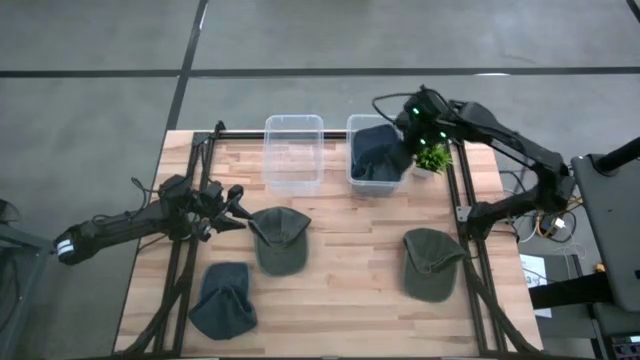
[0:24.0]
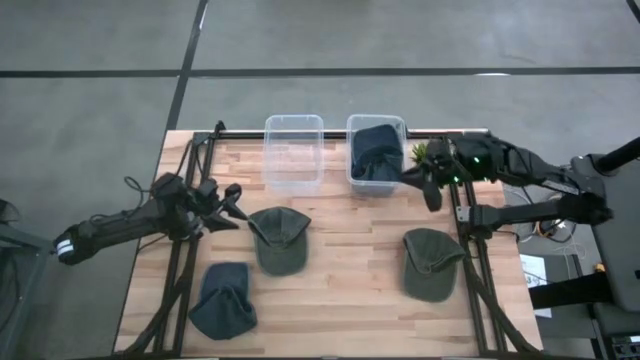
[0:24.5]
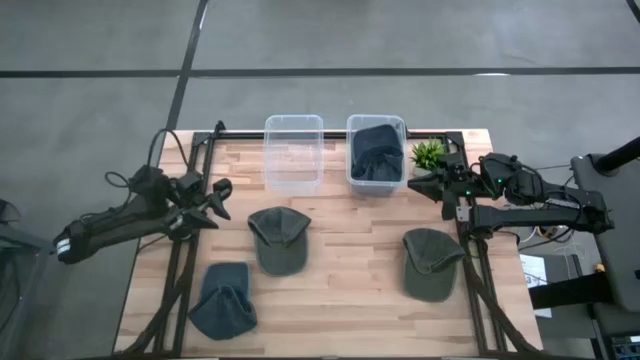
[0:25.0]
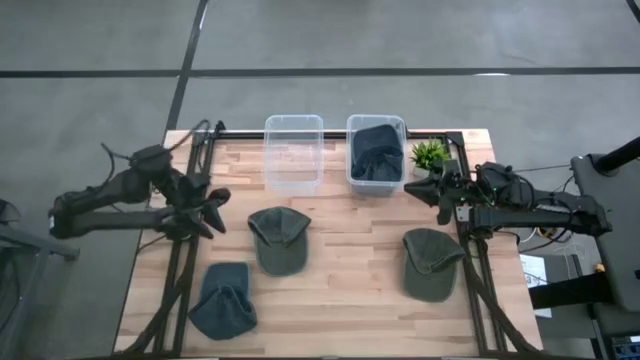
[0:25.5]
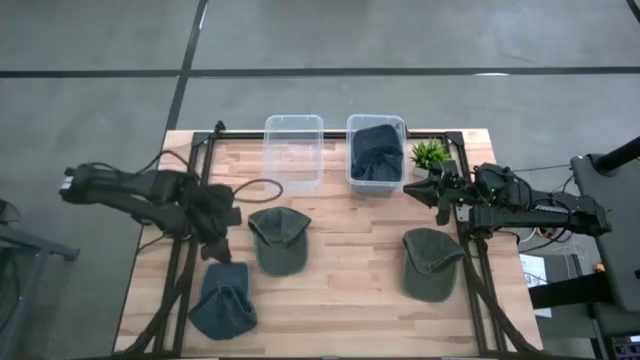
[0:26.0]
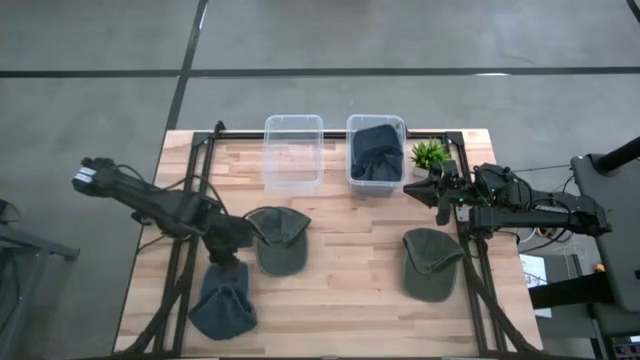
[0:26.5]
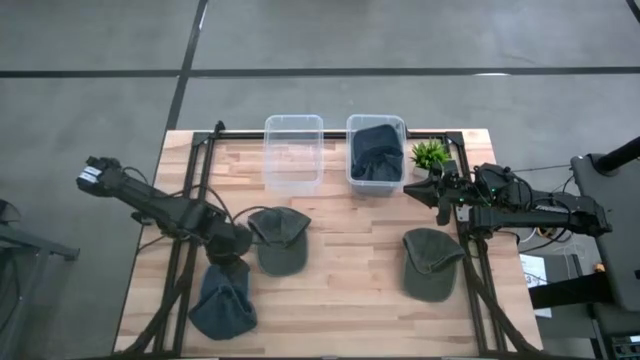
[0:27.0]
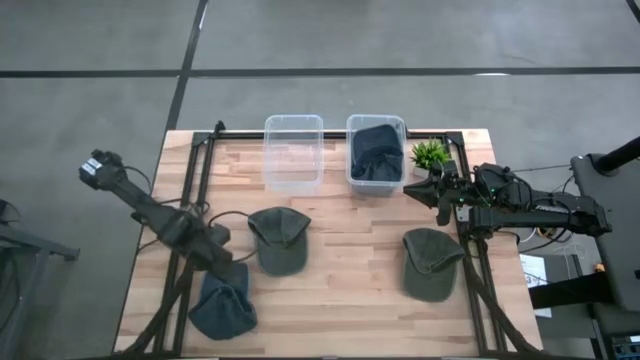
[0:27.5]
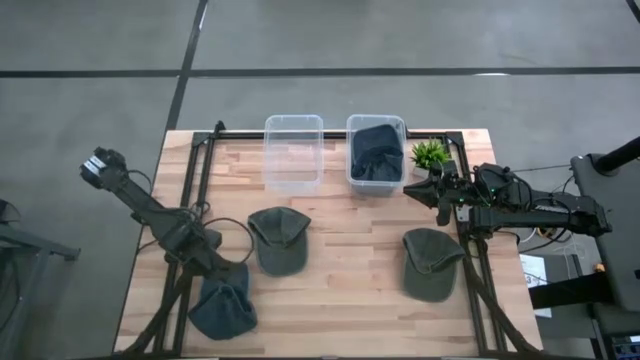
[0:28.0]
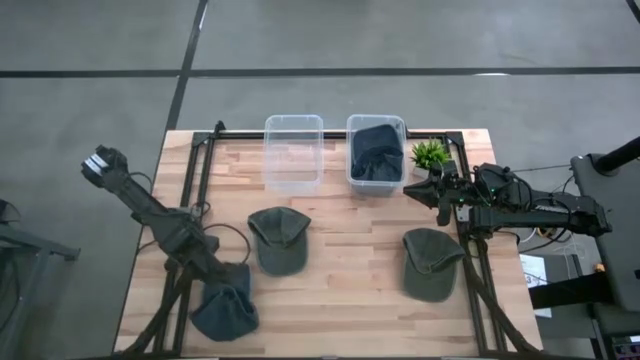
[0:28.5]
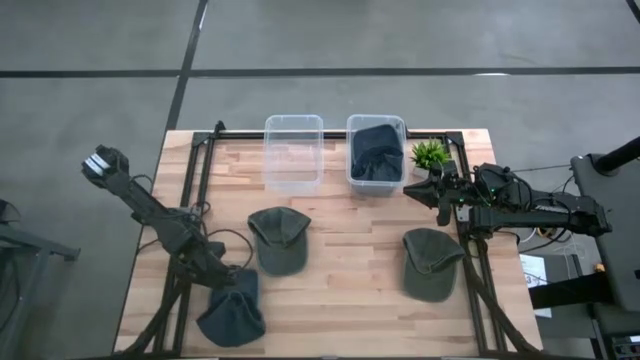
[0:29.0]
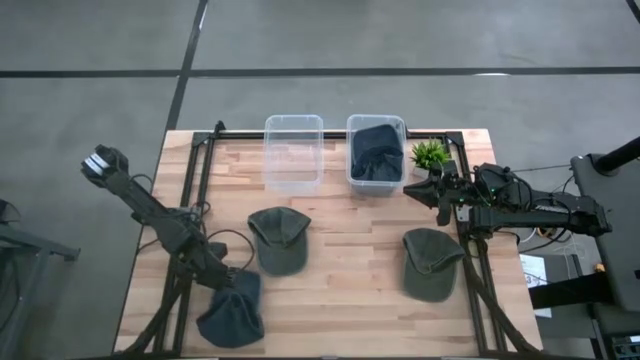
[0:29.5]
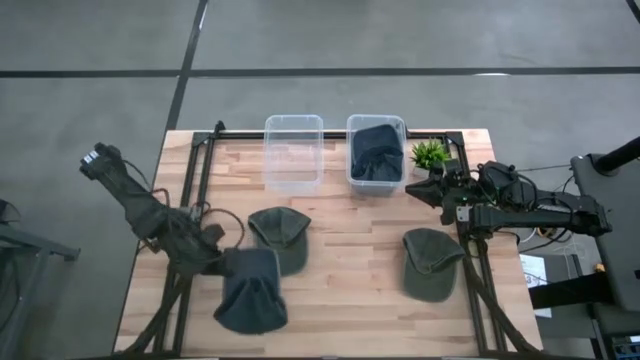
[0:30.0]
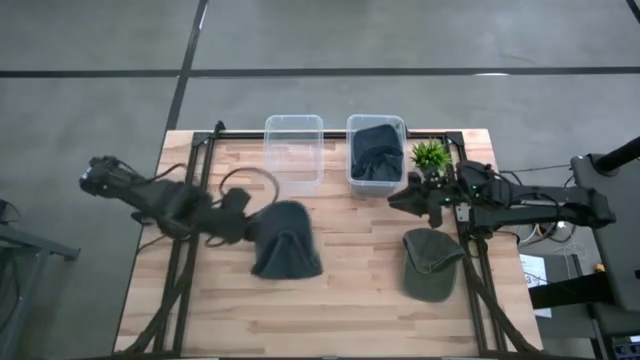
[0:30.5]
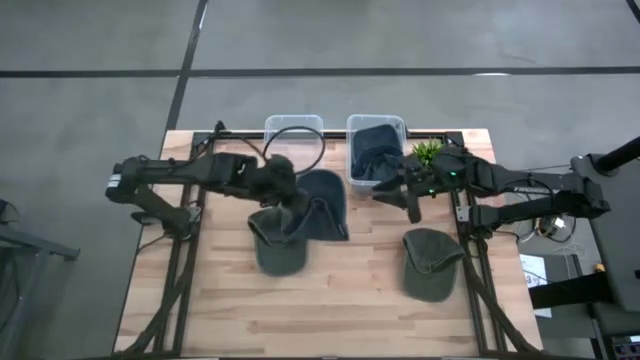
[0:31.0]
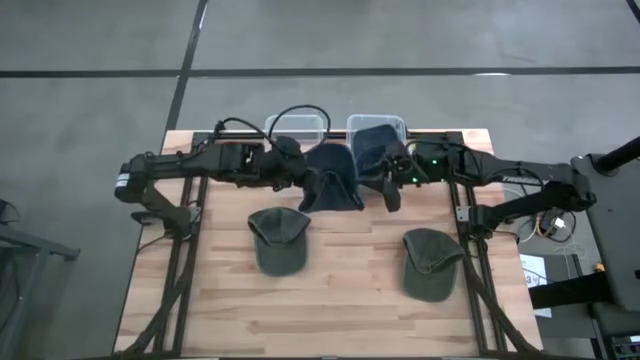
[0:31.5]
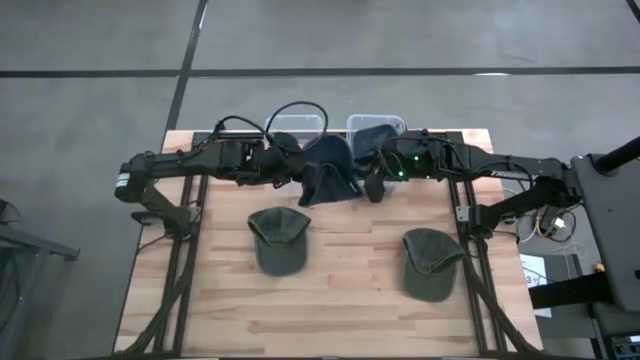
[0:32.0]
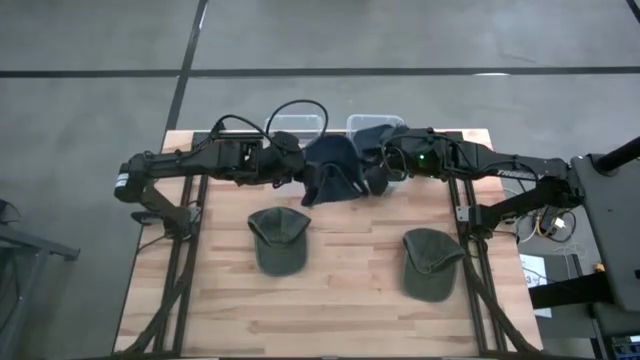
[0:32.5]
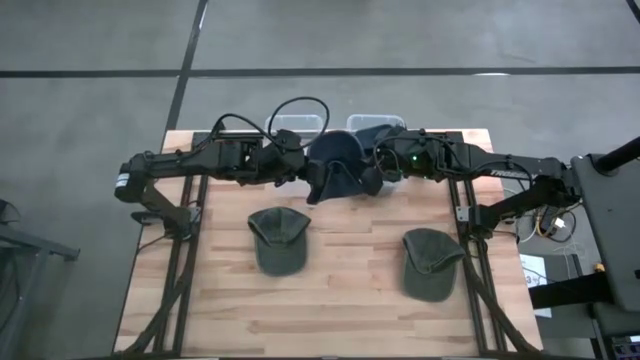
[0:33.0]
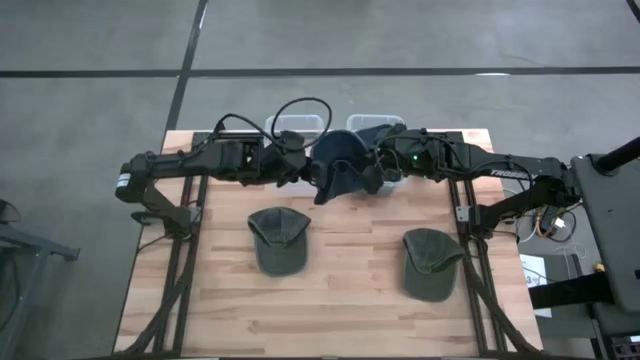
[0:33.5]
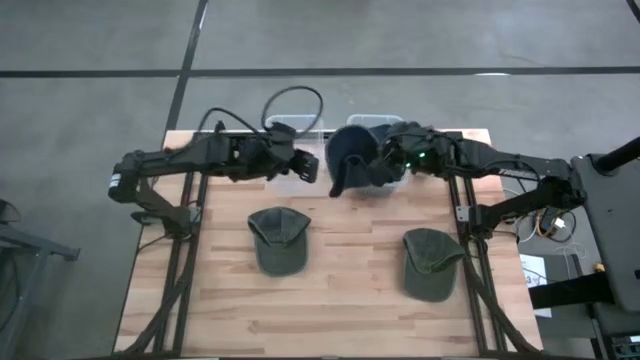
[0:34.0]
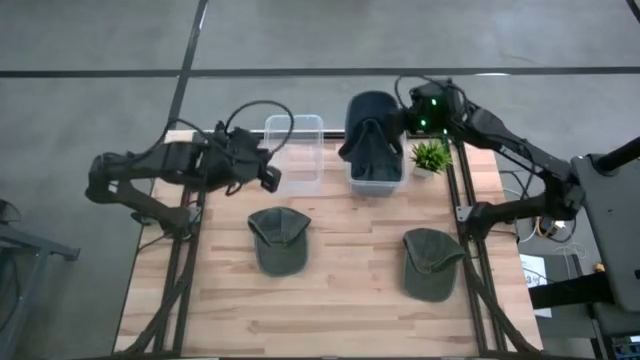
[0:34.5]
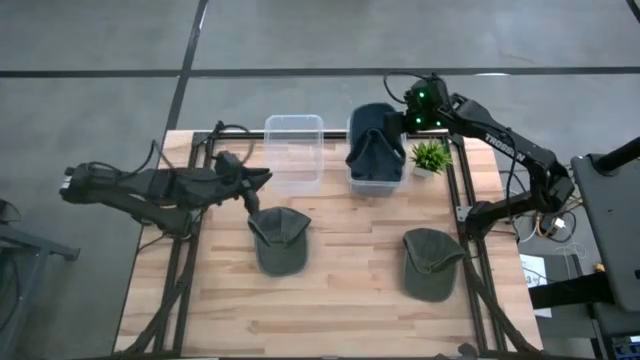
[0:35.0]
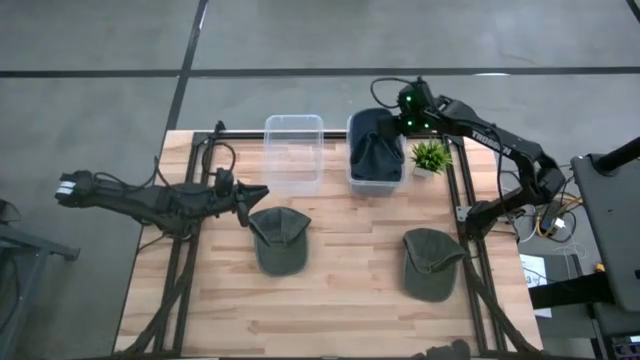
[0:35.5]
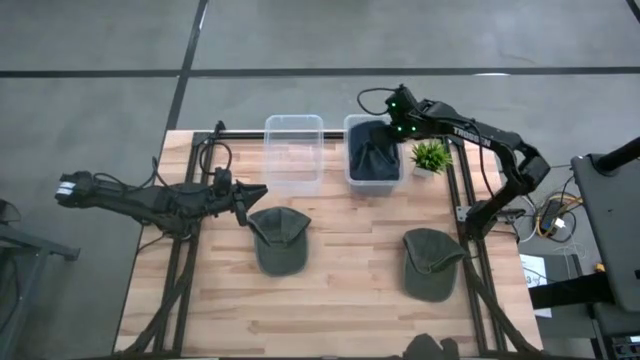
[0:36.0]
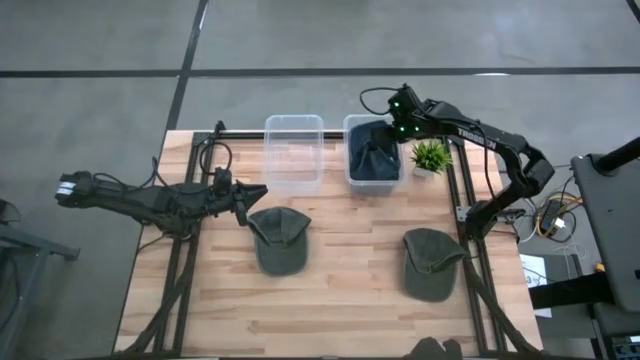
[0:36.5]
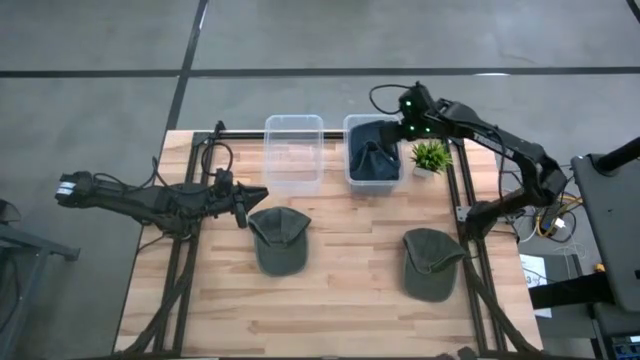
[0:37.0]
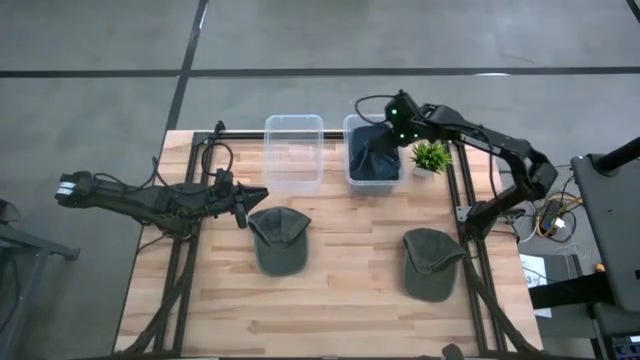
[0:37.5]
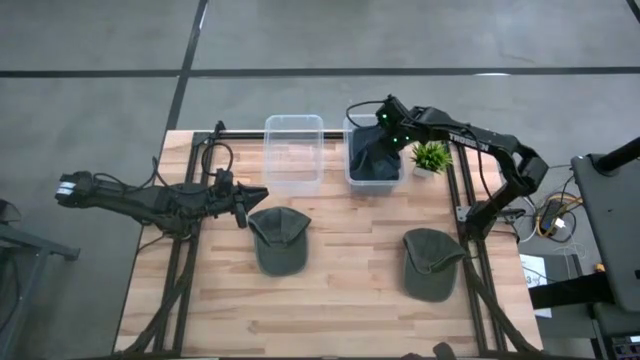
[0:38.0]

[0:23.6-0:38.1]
Task: Pick & Place hat
Put the blue cap into the right transparent bin
